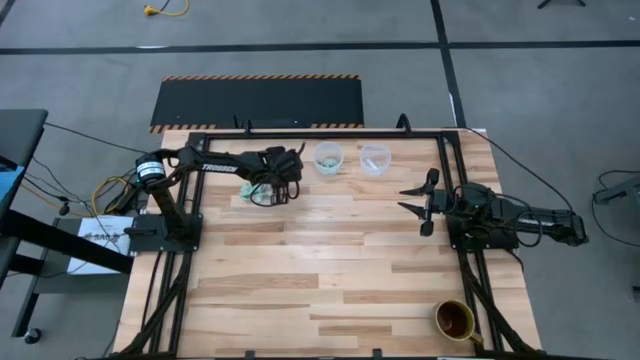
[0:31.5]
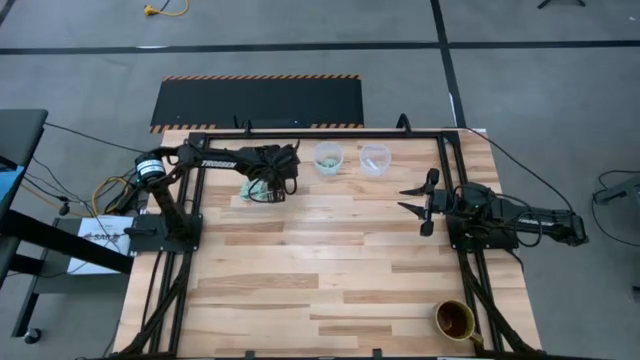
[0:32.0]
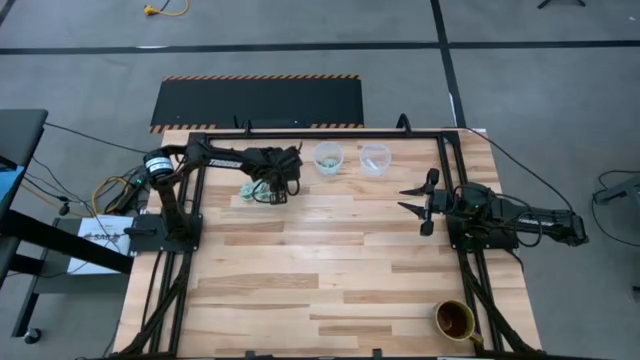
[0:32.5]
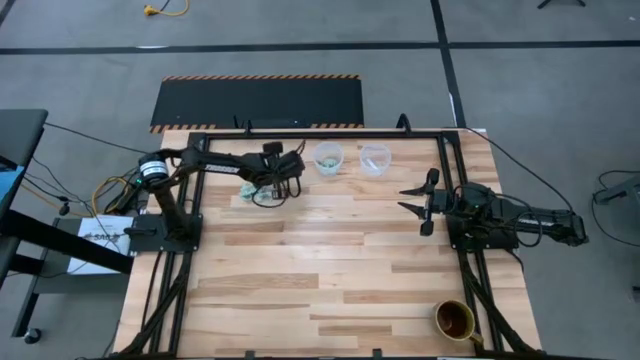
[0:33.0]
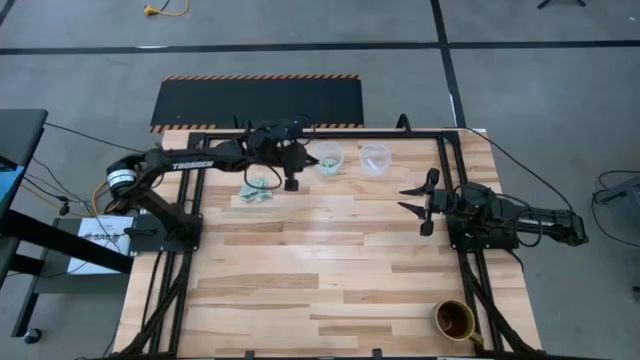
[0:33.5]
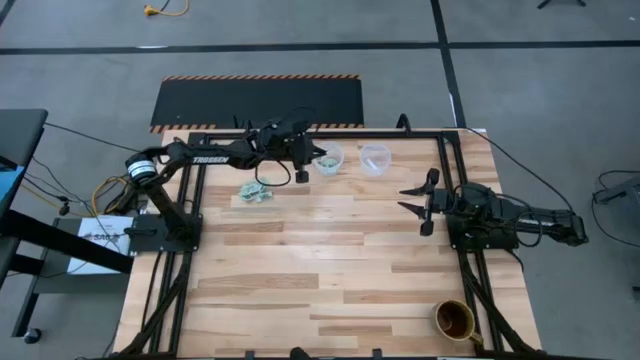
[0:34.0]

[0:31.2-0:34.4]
Task: Pick and place Stevia / Truvia into bins
Put the stevia packet into the left transparent container

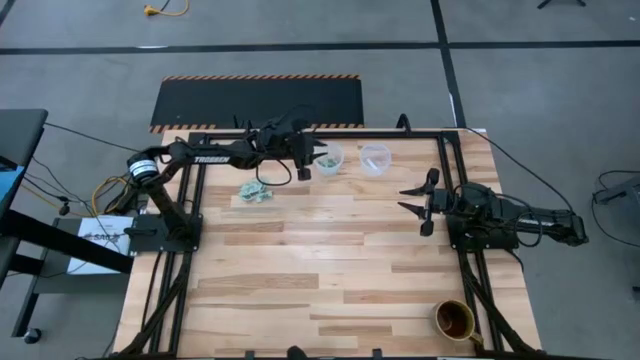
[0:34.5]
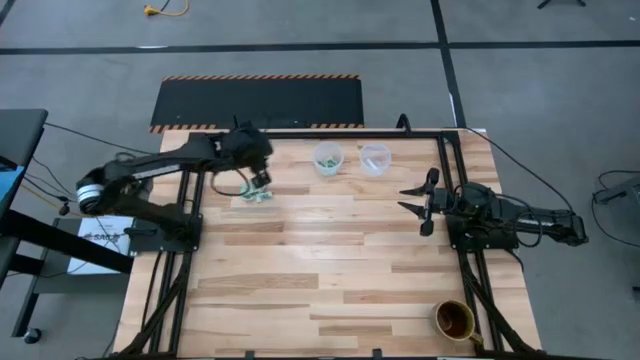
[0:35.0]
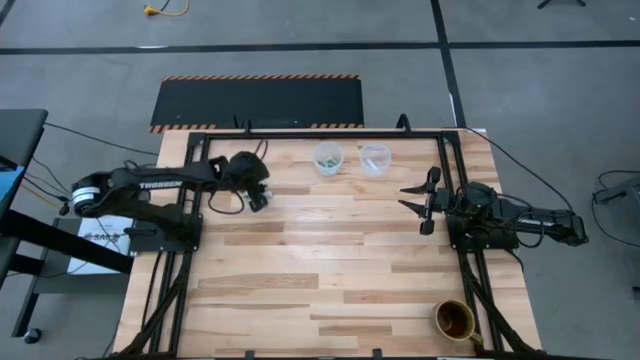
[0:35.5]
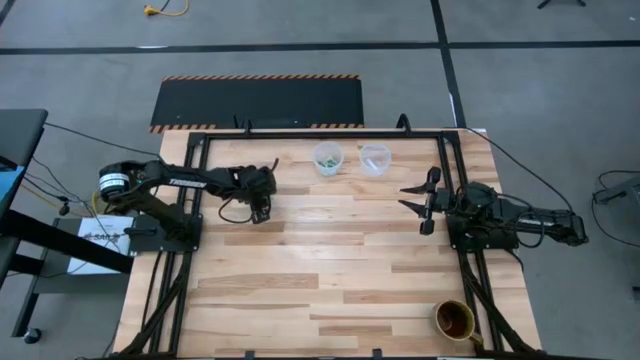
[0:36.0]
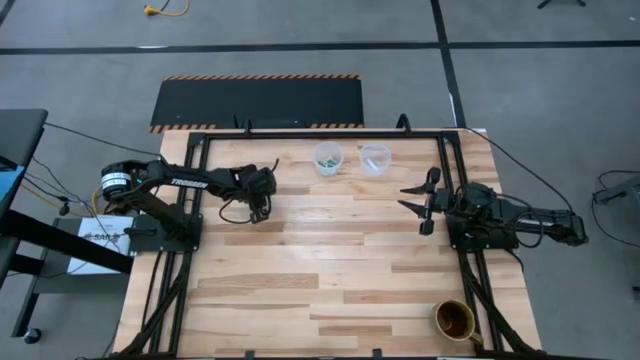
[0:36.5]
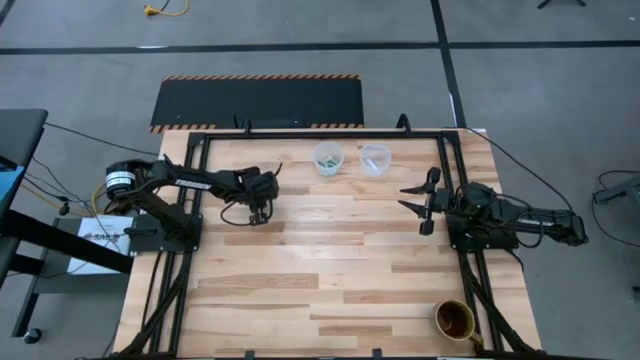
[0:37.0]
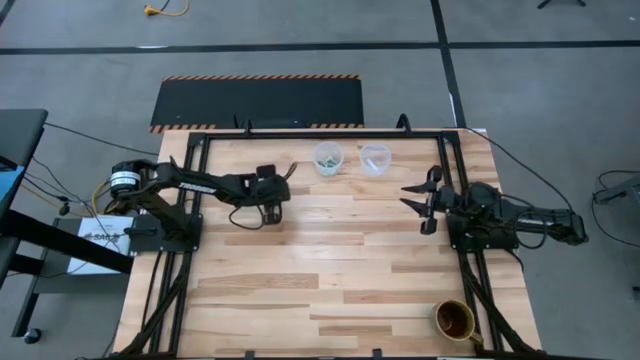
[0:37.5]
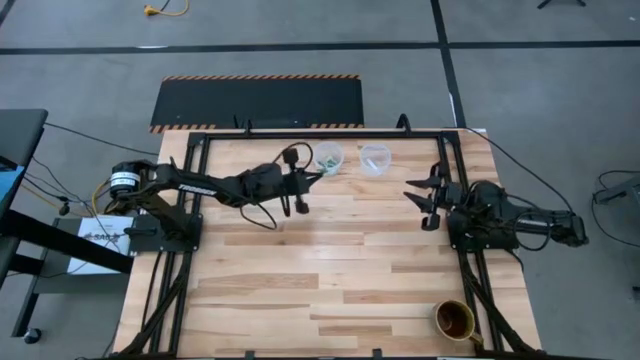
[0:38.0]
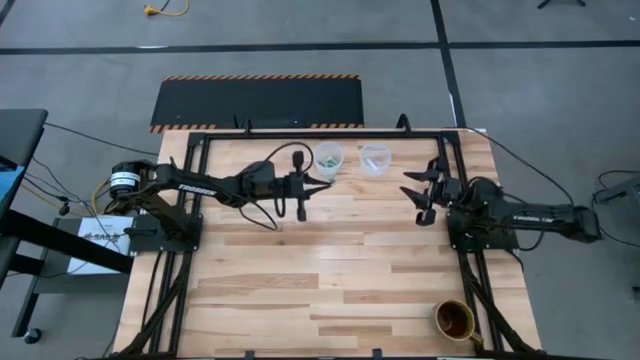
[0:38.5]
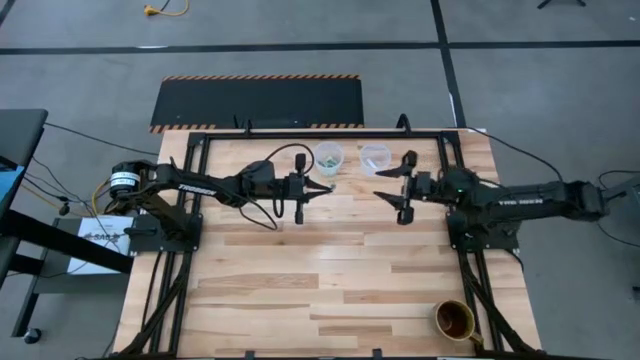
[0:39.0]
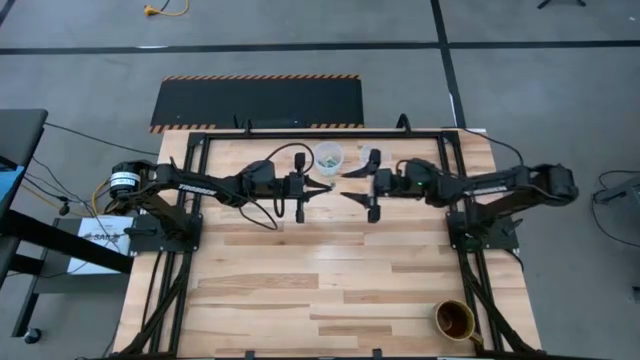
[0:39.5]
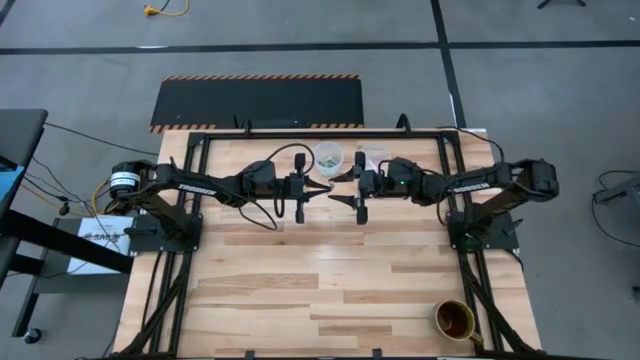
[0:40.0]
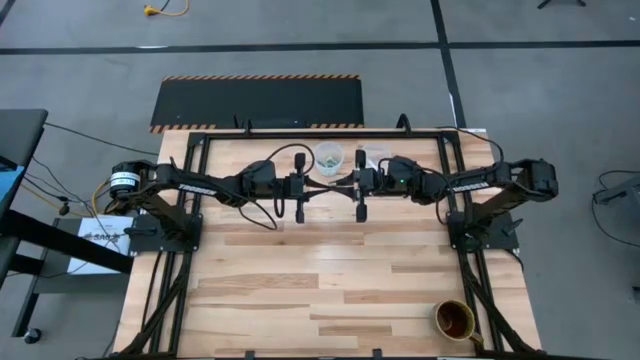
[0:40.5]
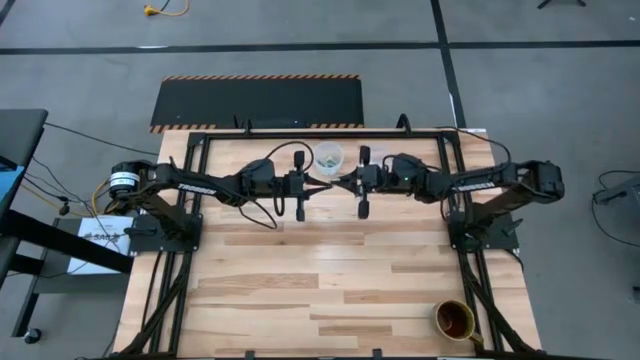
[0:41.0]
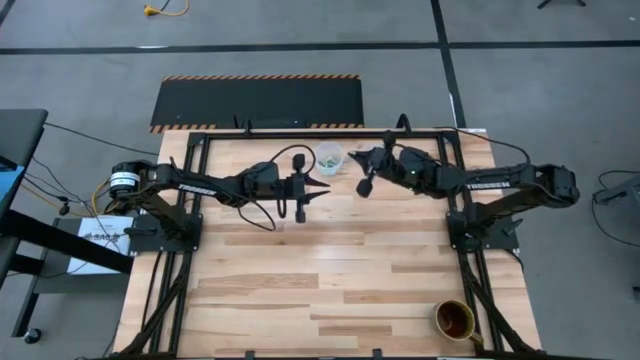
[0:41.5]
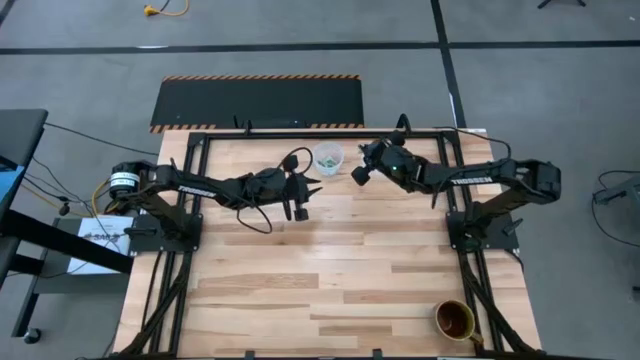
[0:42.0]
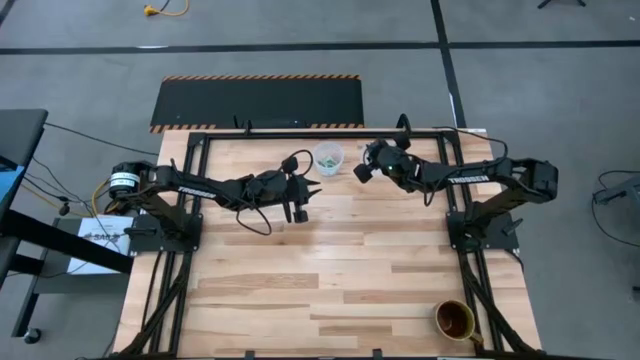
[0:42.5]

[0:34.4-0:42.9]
Put the stevia packet into the right transparent container

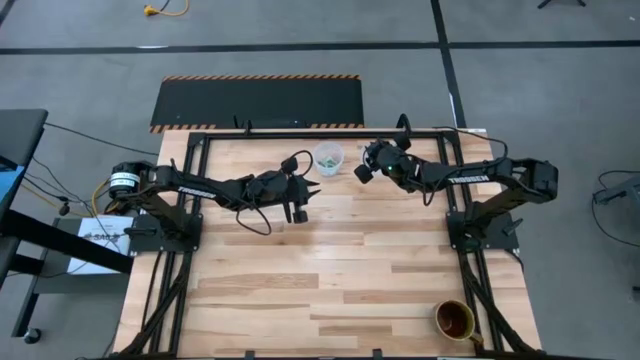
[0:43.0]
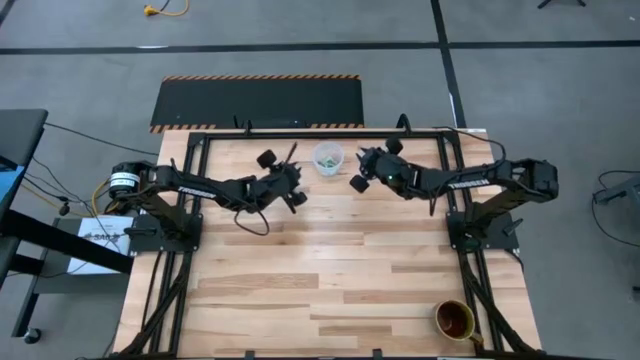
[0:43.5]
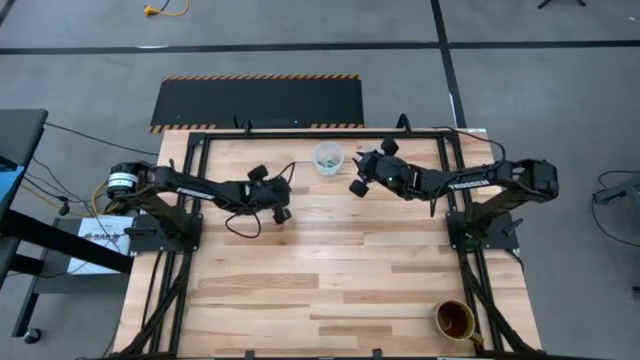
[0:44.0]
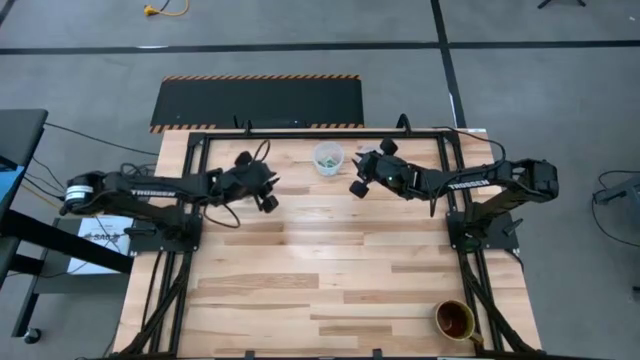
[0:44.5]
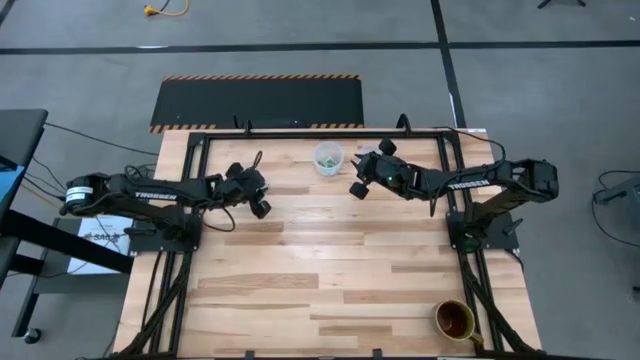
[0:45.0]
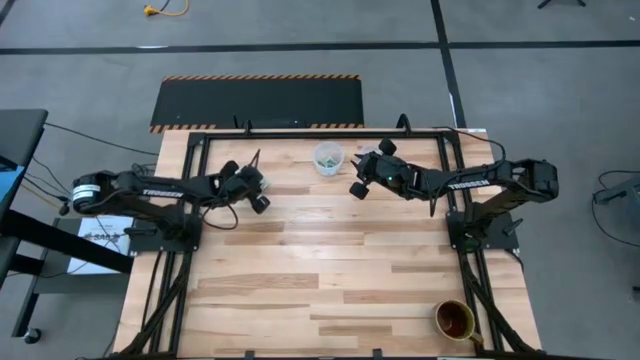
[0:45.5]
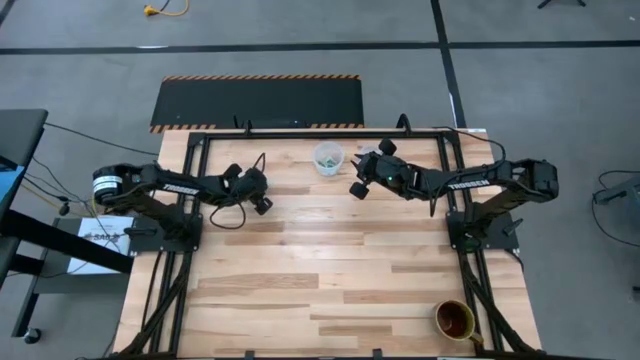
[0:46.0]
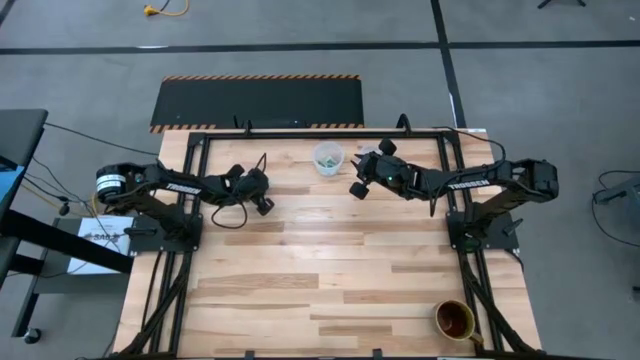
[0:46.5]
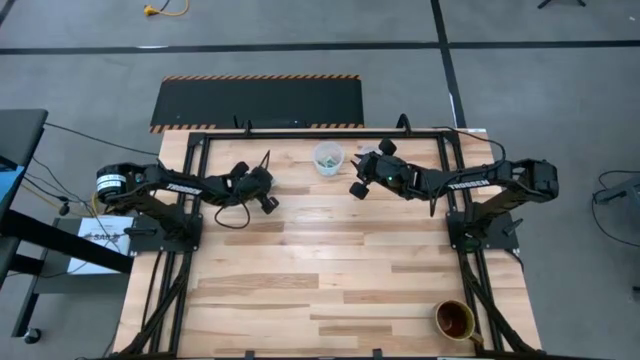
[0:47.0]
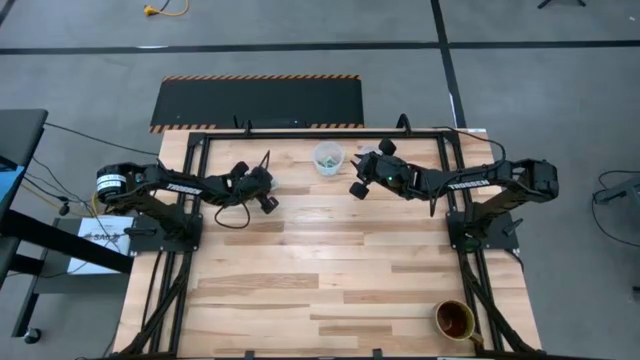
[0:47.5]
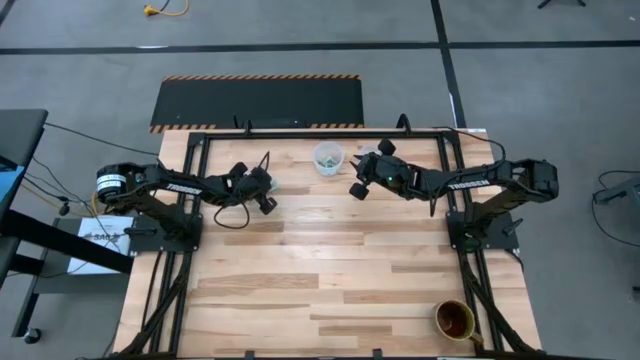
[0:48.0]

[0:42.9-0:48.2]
Put the stevia packet into the right transparent container

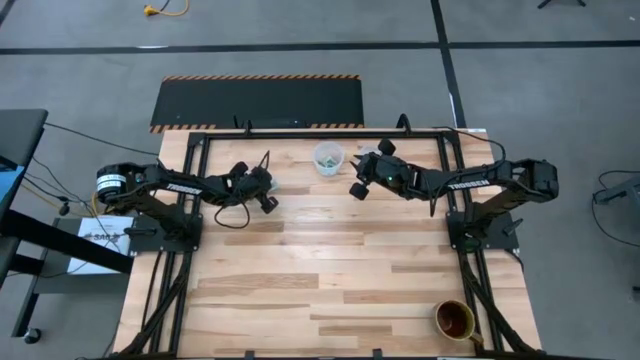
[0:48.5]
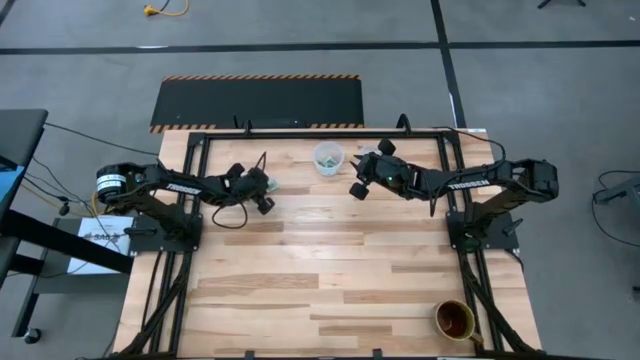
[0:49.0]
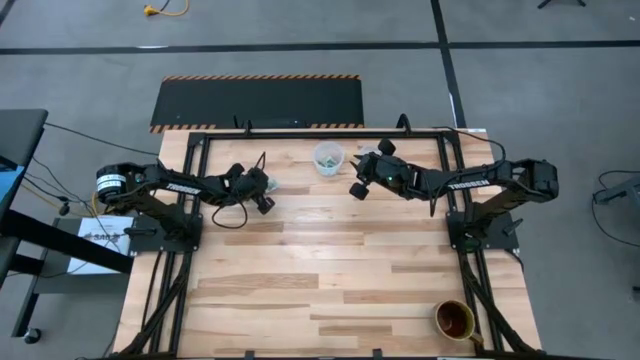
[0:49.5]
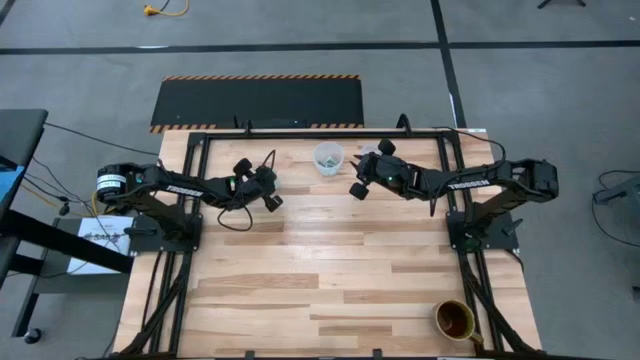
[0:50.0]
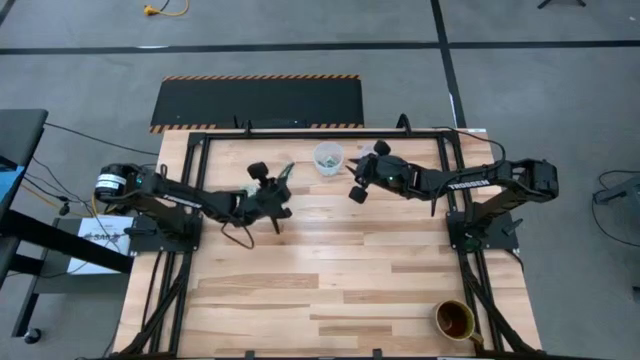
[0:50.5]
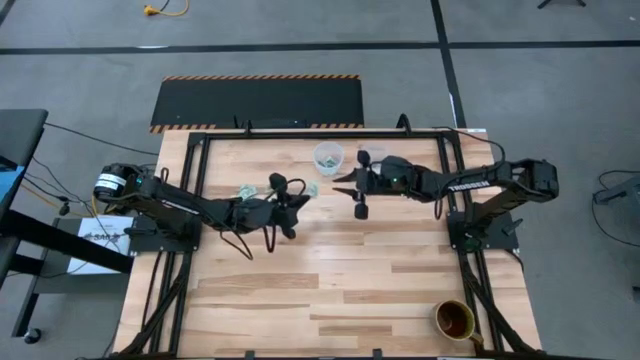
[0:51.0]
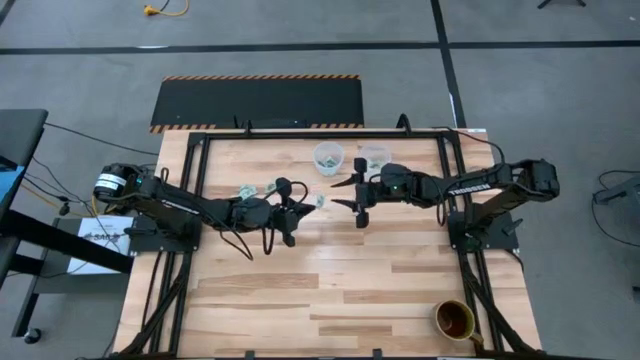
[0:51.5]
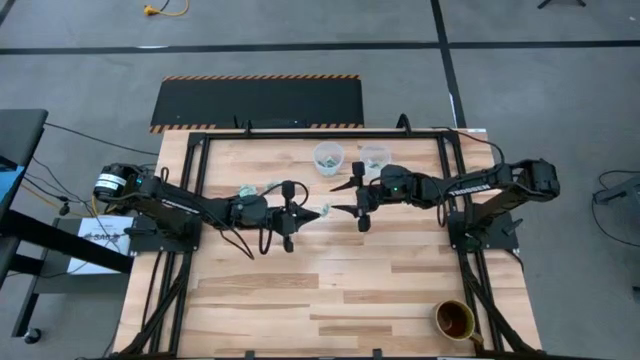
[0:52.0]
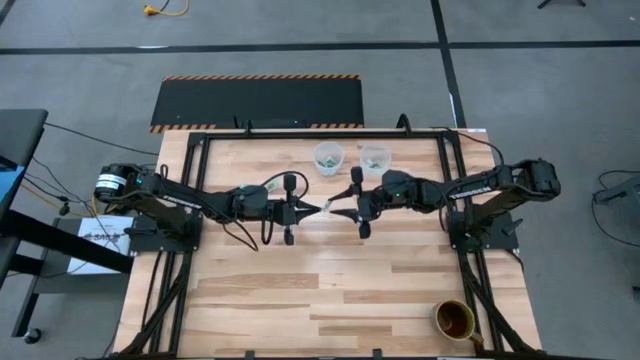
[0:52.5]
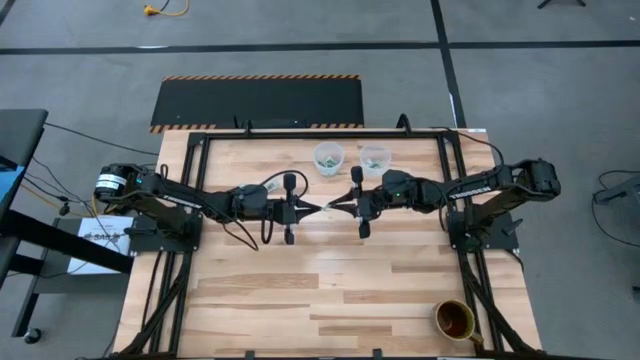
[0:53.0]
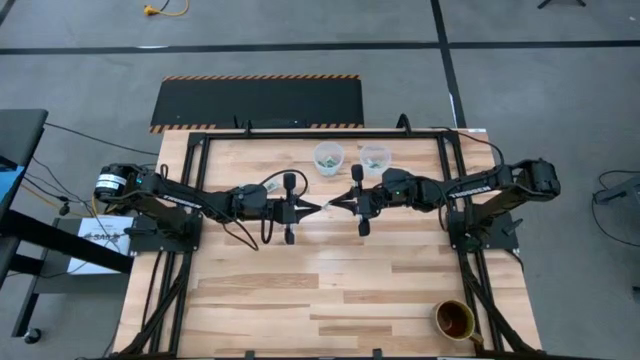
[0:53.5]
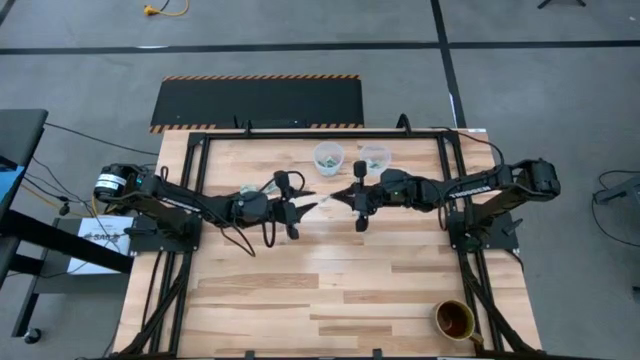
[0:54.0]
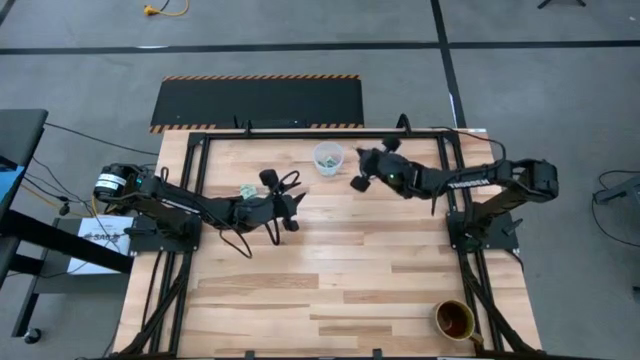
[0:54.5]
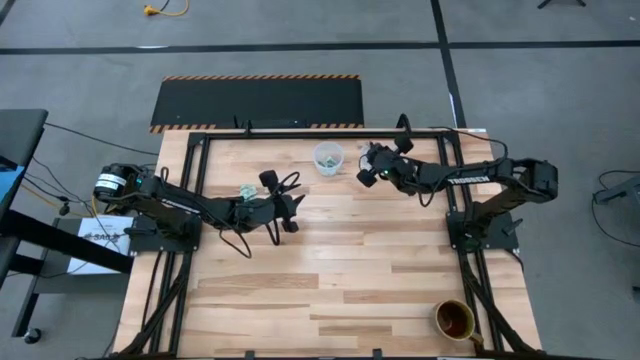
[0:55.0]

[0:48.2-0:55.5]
Put the stevia packet into the right transparent container
